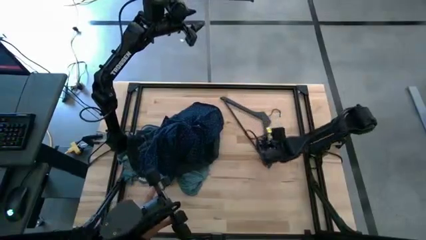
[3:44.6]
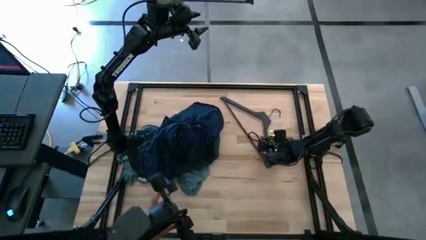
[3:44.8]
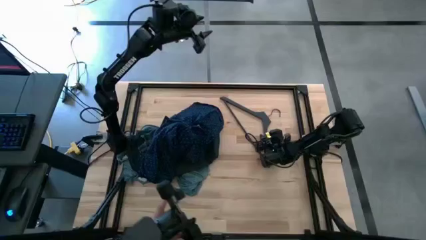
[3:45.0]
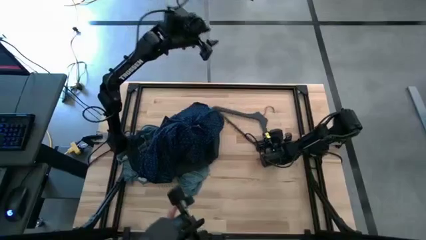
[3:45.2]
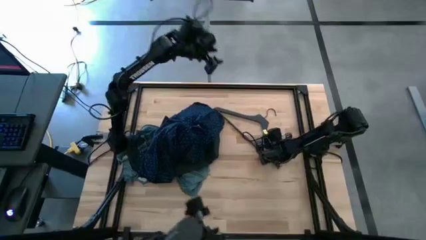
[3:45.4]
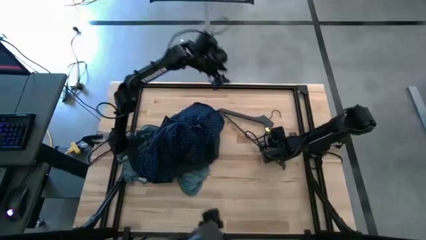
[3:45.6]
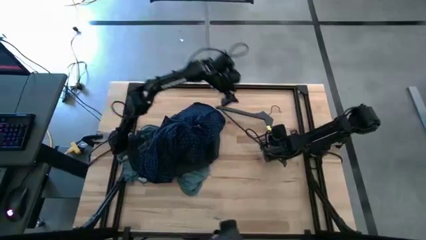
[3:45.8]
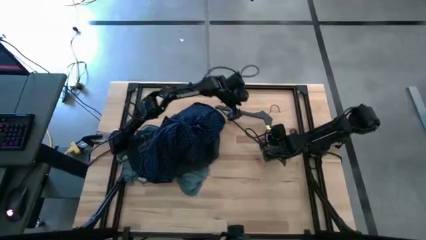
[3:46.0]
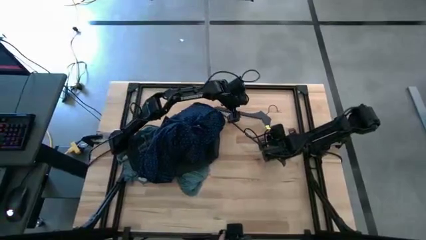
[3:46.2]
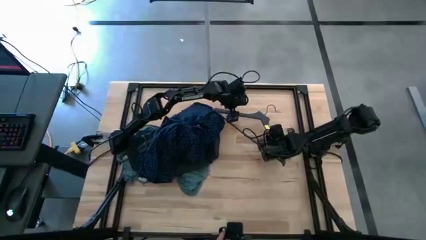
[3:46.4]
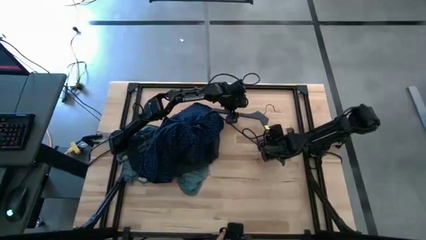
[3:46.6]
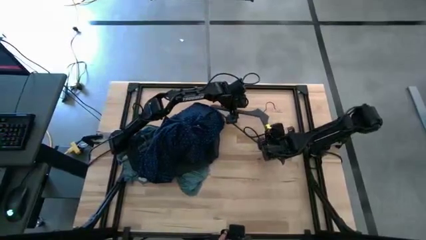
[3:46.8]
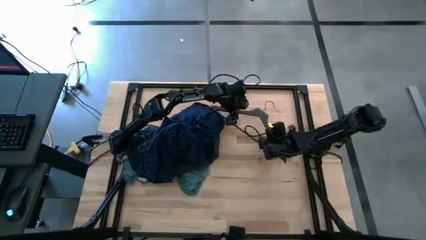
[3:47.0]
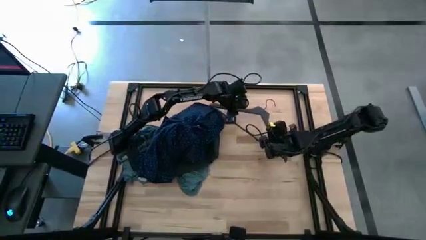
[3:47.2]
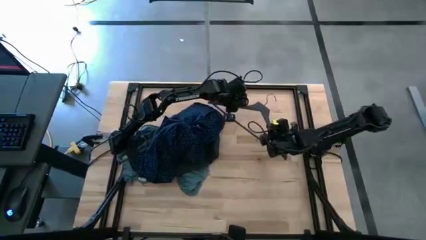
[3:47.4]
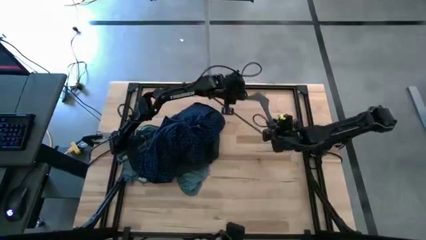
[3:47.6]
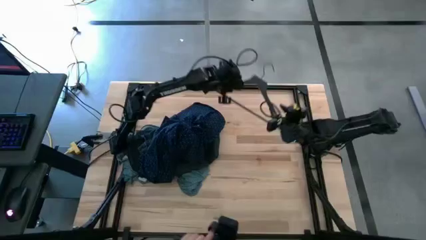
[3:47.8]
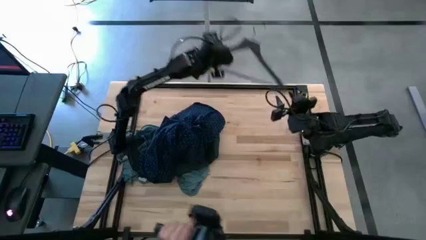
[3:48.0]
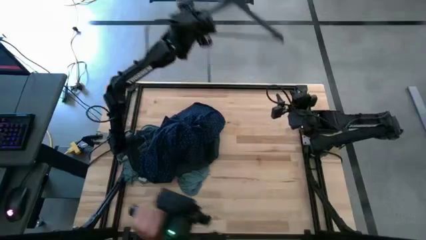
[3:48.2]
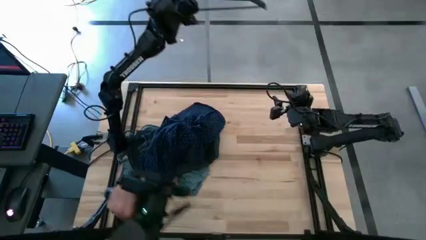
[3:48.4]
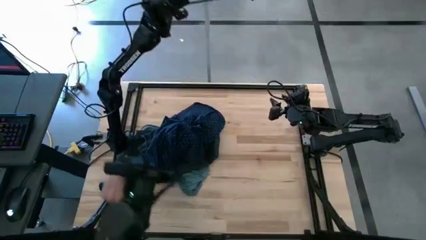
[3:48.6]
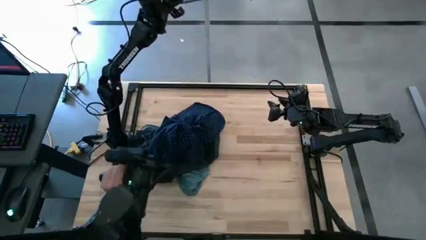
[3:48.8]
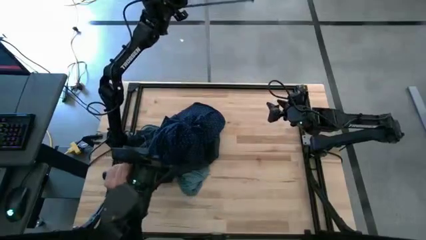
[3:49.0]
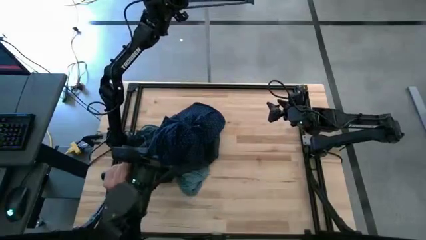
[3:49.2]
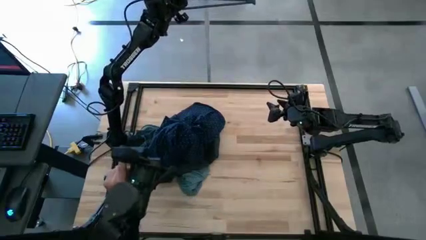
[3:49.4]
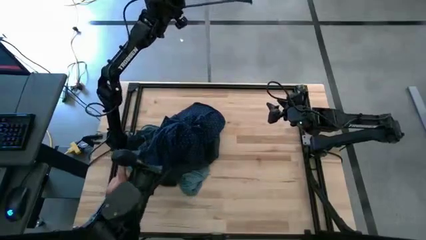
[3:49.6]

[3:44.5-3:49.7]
Task: Hang clothes
Hang the hanger on the hanger rack

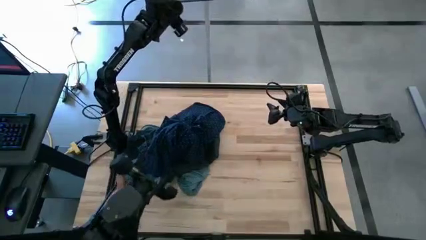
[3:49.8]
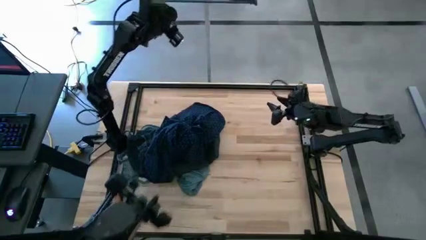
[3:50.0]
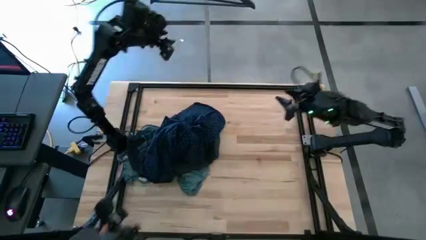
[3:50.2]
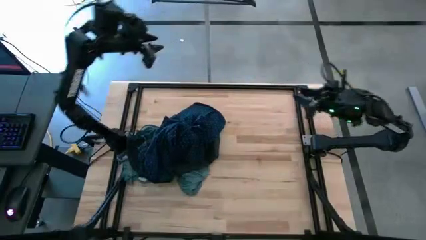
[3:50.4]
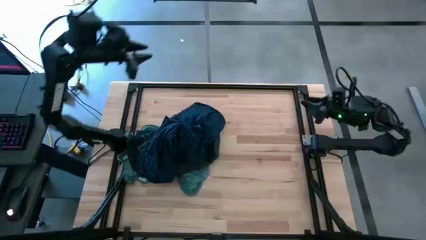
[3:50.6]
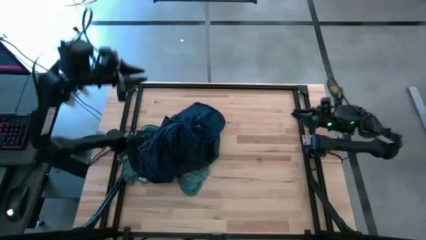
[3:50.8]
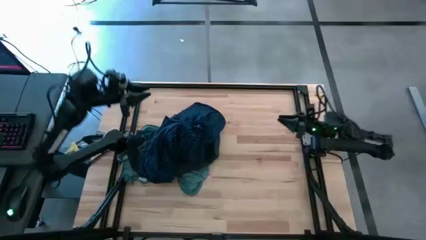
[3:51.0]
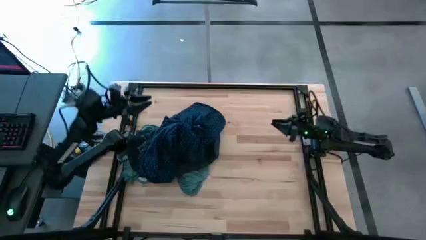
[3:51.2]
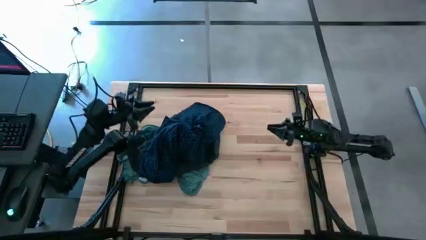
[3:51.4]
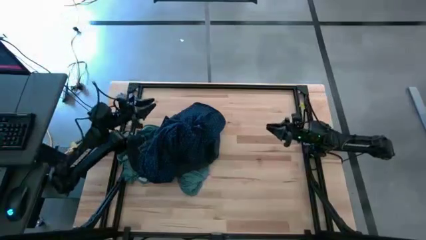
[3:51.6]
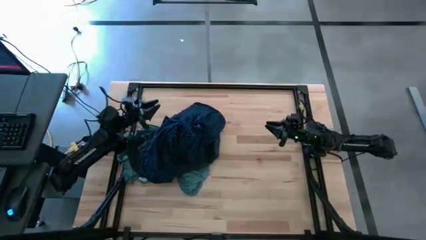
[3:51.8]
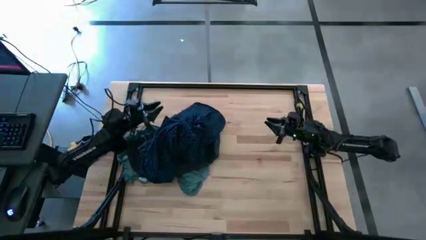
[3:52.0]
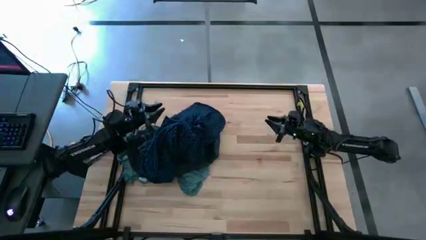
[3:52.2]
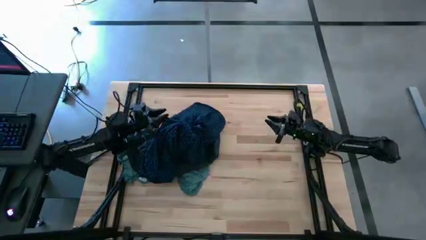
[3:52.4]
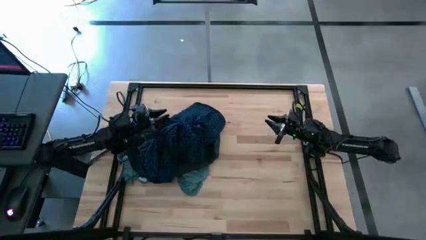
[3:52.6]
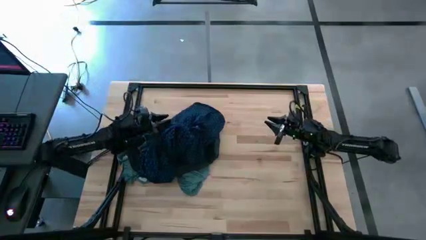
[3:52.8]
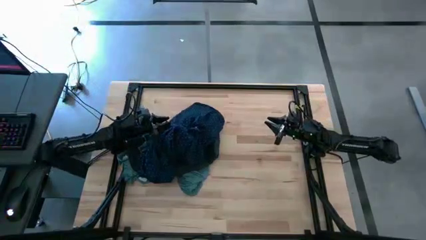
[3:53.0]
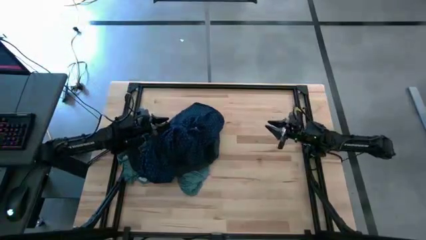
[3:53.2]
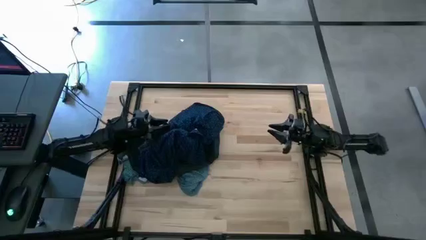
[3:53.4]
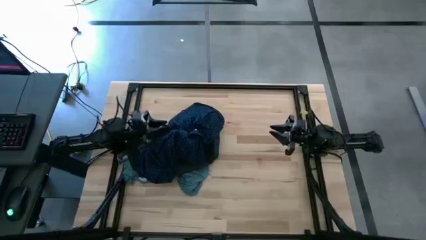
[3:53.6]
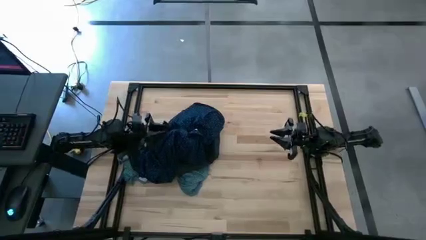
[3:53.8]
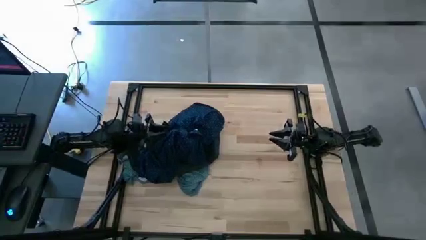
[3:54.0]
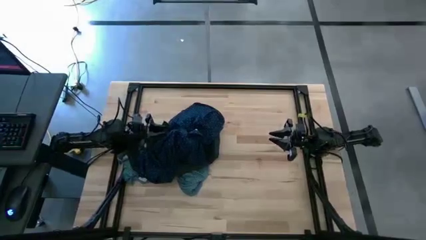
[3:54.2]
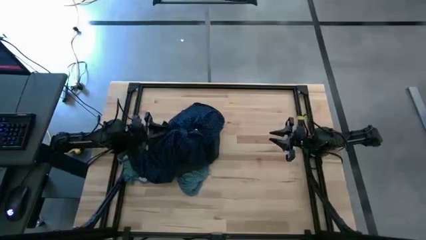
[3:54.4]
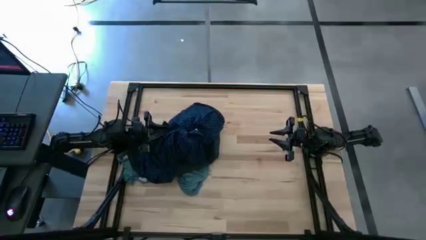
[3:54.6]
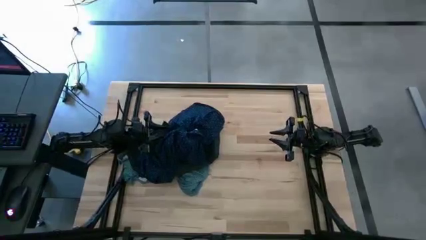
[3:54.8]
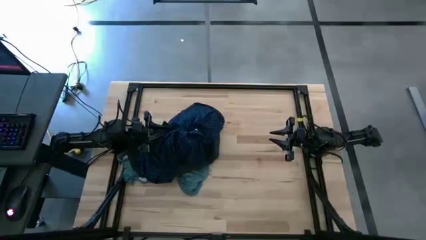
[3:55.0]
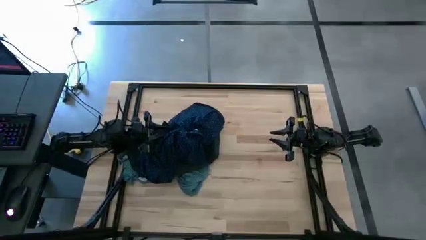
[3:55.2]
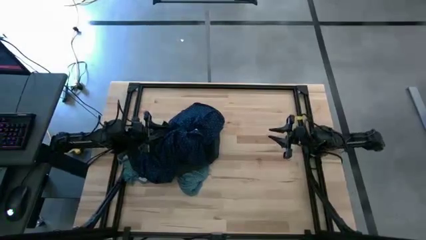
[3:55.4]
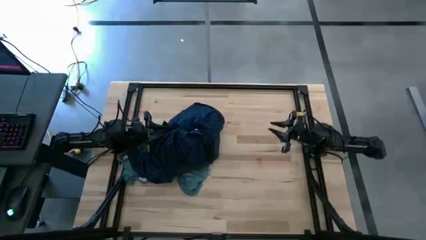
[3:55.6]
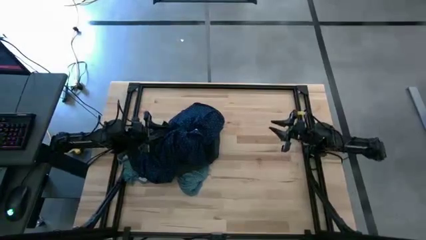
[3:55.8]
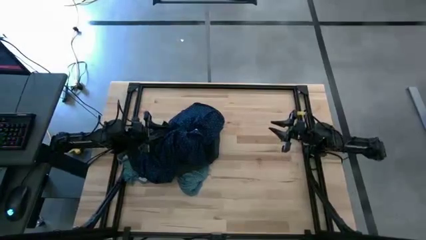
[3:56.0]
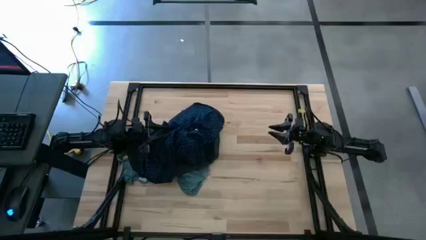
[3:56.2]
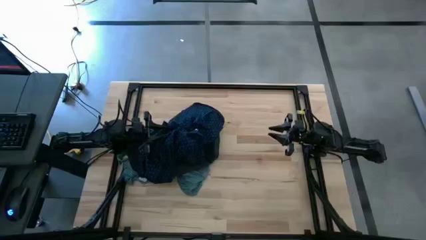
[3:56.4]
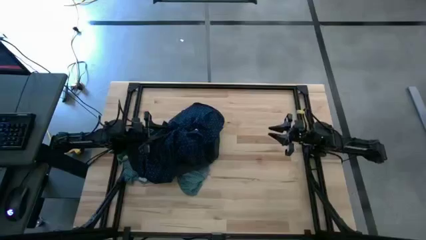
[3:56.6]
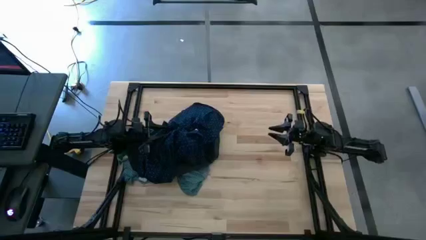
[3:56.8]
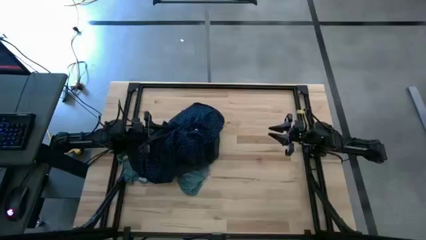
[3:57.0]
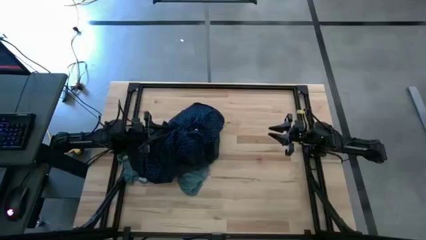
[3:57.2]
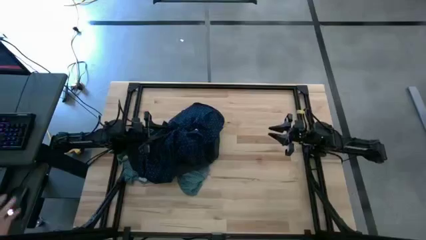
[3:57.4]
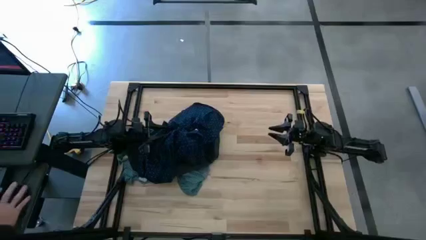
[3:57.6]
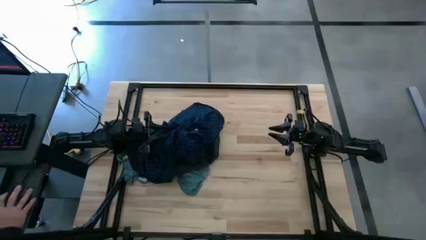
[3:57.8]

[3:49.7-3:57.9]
Return to Home Position

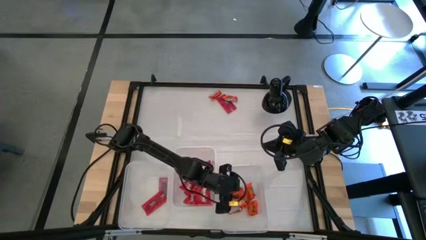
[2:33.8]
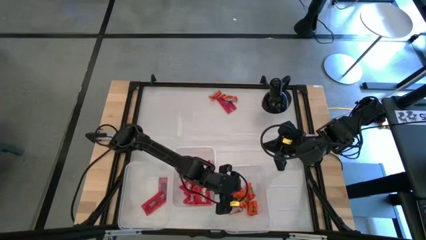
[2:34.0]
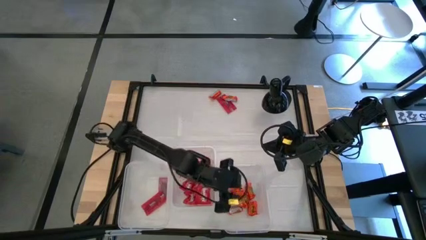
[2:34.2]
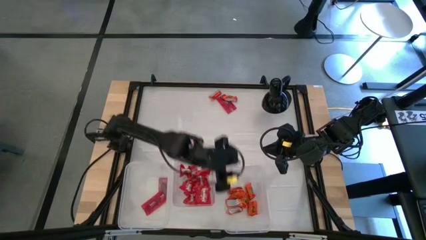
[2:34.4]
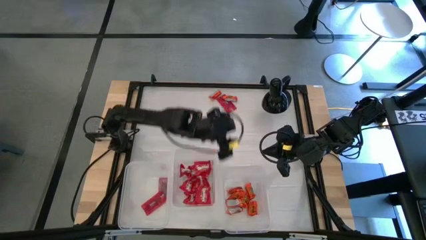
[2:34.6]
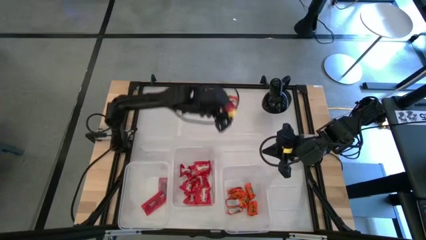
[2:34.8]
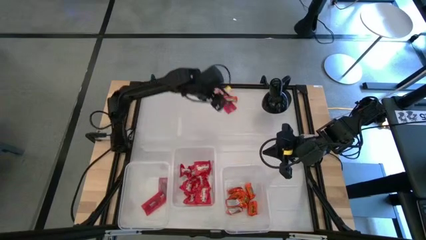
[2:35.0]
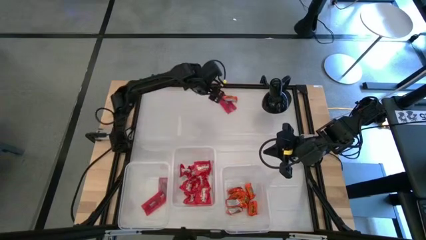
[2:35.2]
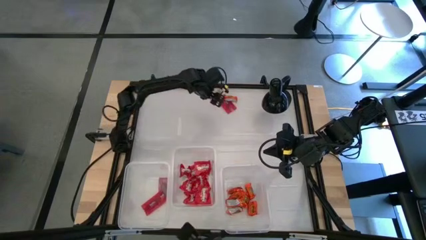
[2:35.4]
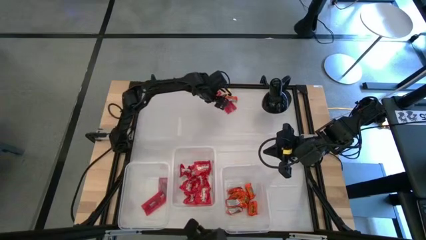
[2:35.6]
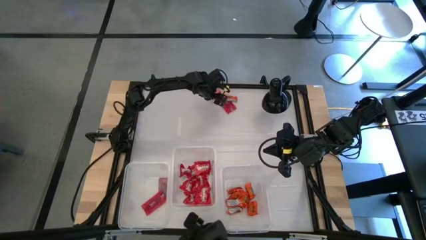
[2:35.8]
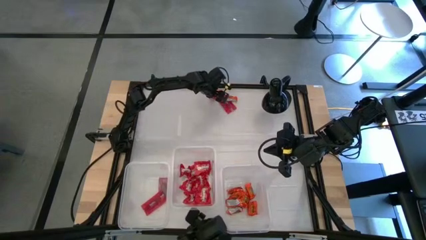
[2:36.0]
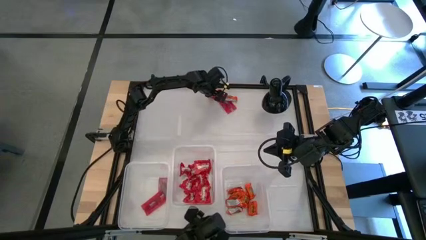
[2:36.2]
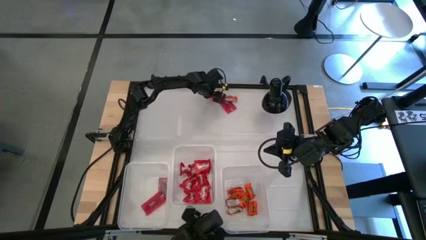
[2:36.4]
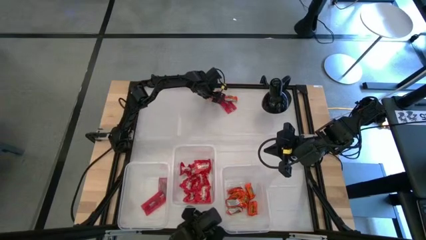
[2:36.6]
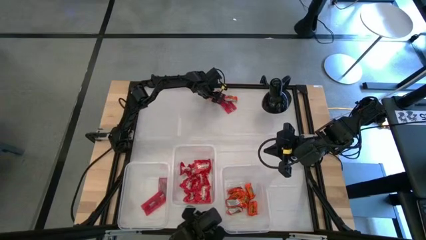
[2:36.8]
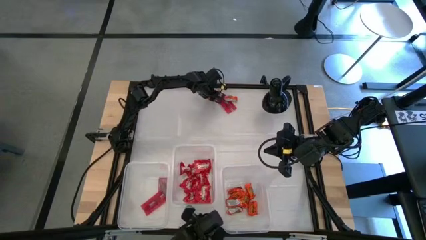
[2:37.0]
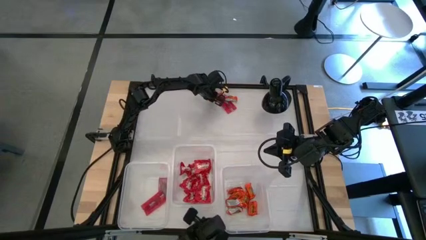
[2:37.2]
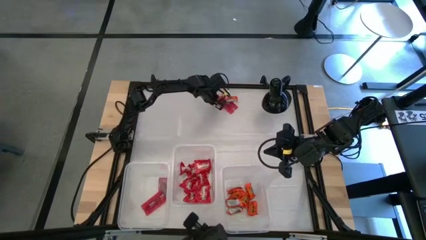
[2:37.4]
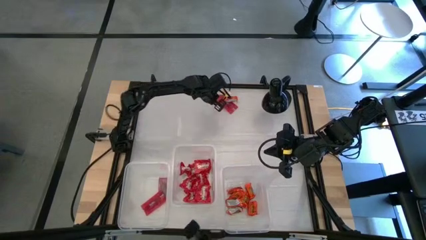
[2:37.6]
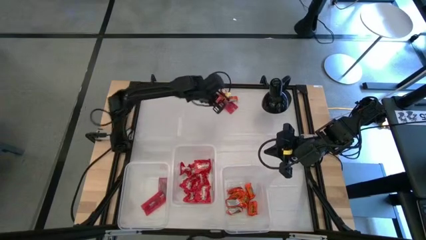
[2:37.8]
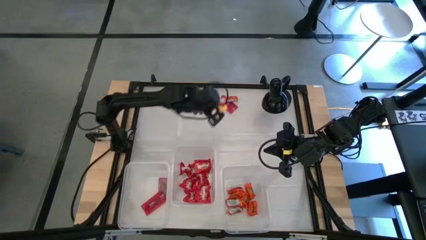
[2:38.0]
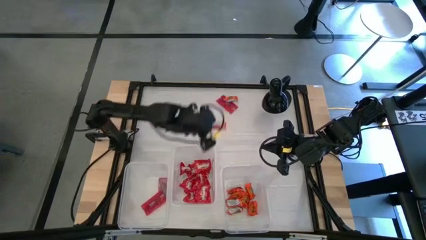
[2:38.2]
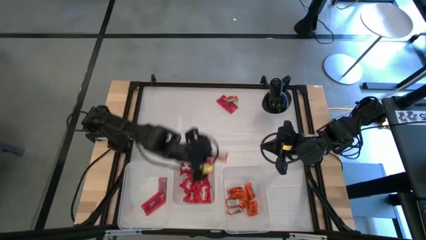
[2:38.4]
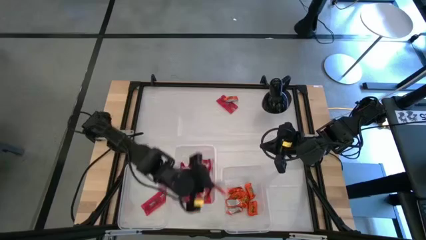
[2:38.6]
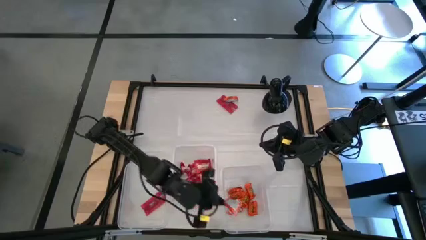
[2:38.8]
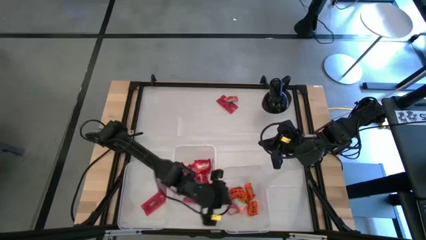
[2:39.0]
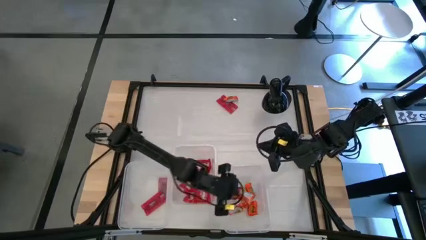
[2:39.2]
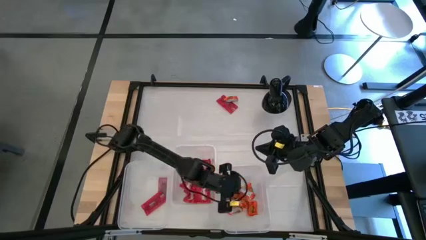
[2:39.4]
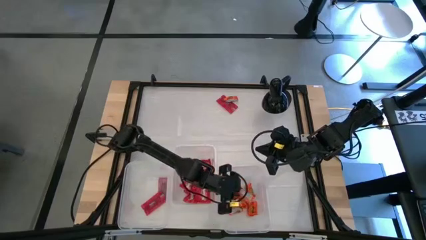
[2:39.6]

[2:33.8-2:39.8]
Task: Sort candy
Put the orange candy into the right transparent bin
